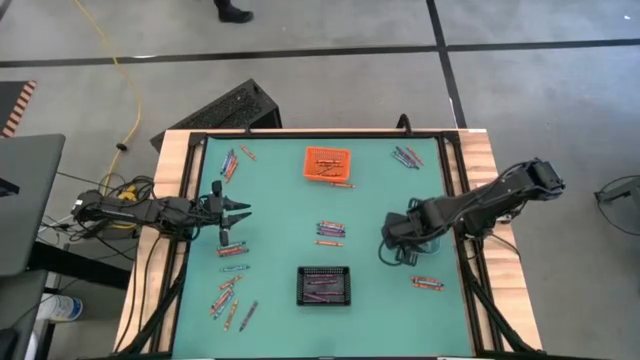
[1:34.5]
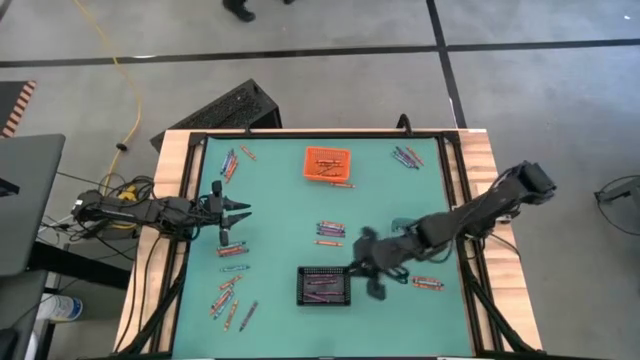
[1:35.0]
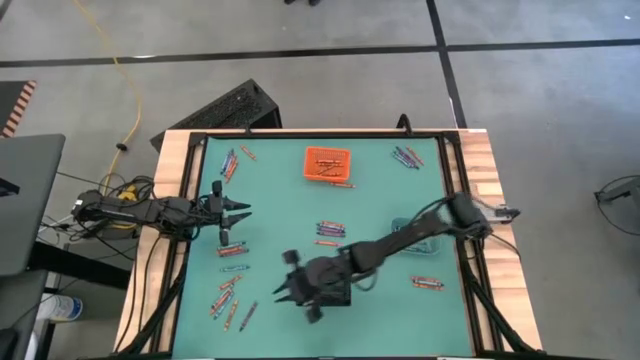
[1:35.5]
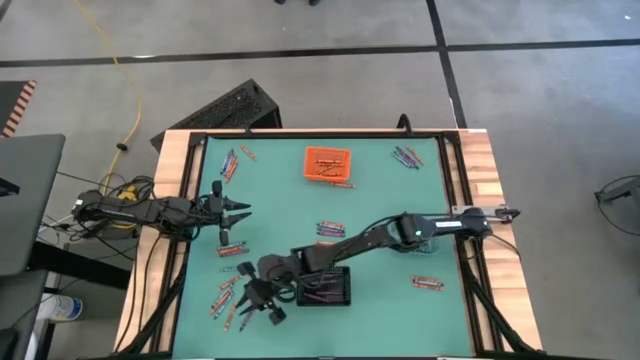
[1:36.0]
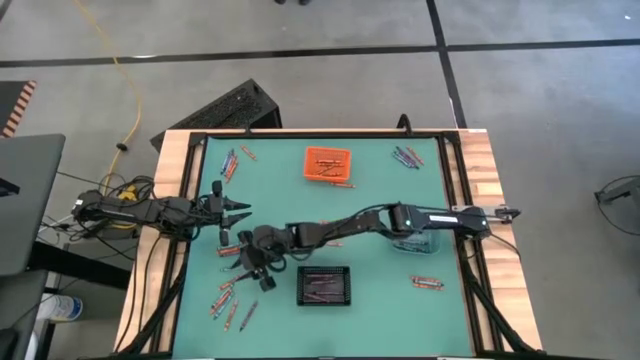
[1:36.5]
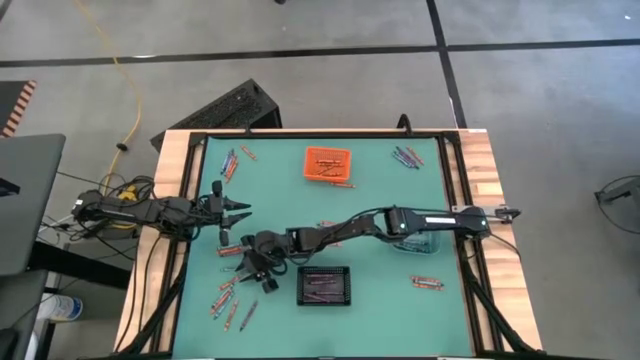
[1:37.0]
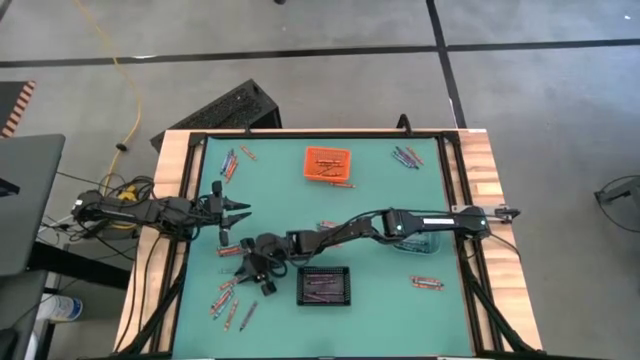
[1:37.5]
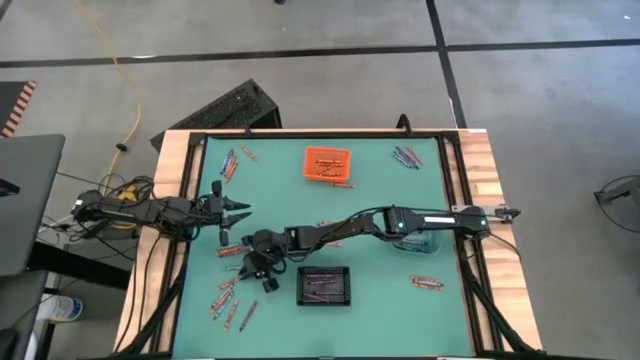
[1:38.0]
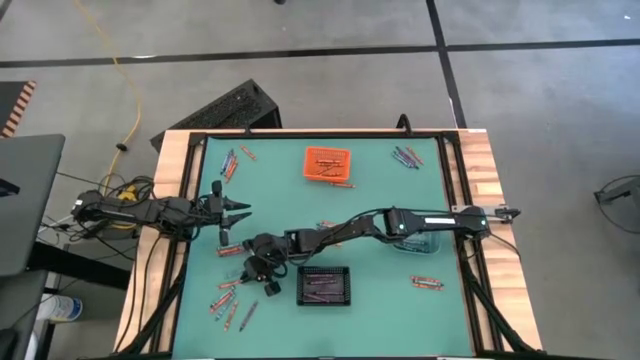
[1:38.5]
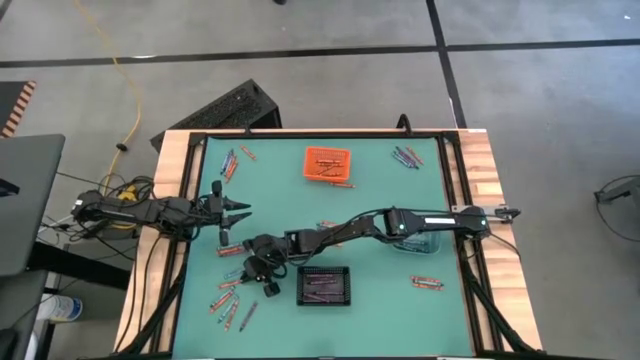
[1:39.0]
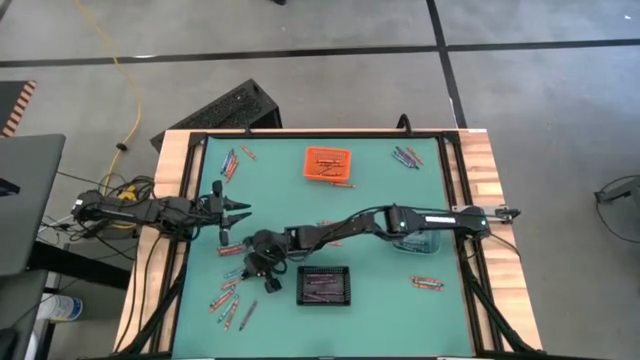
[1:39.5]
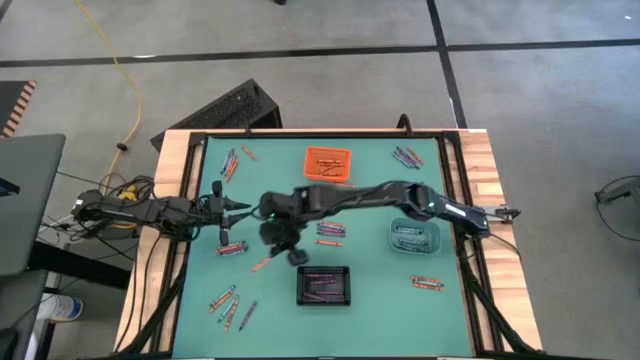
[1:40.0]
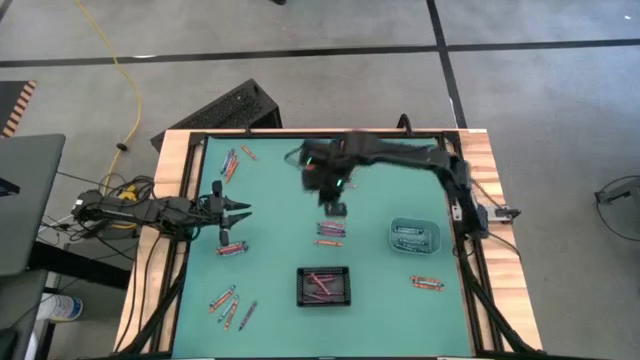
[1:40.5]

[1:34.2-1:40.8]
Task: Sort crayons
Put the orange crayon into the orange bin

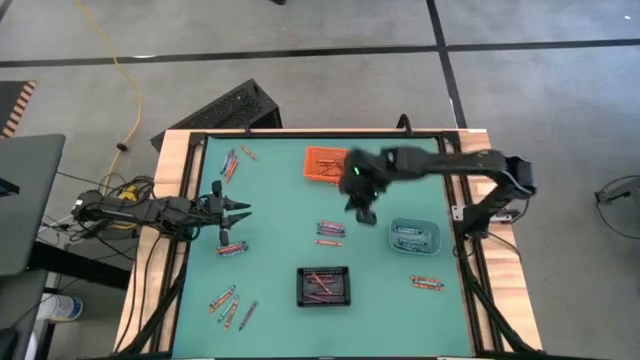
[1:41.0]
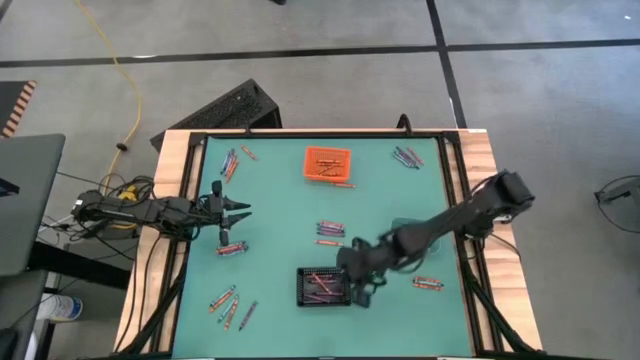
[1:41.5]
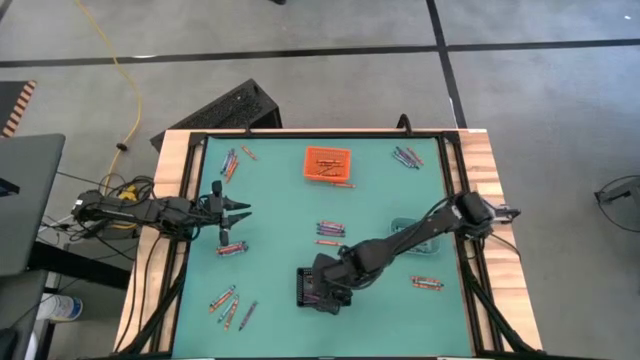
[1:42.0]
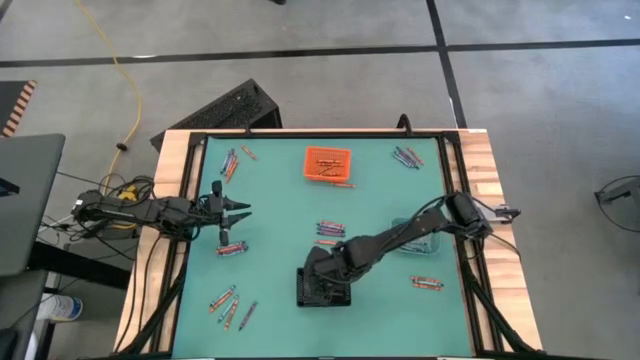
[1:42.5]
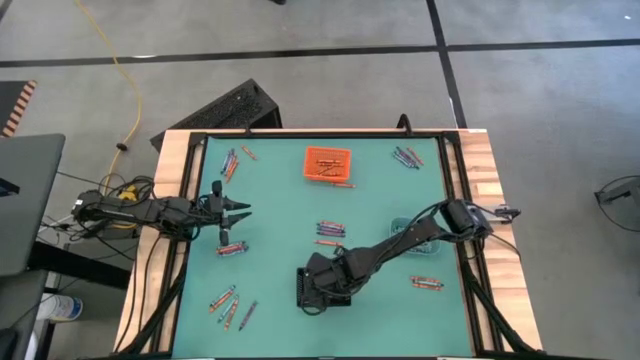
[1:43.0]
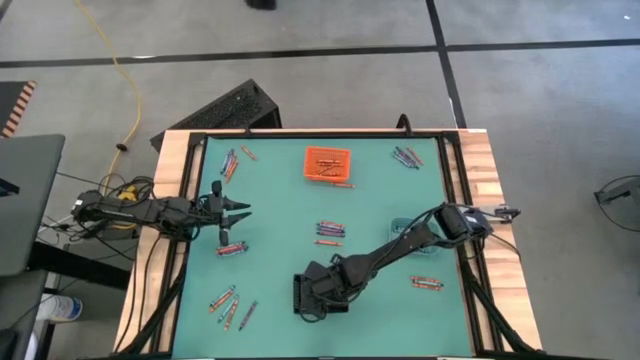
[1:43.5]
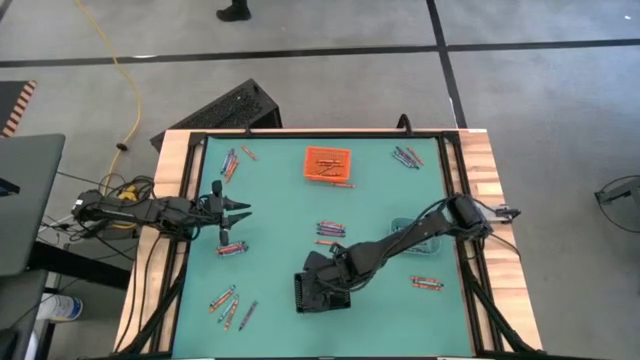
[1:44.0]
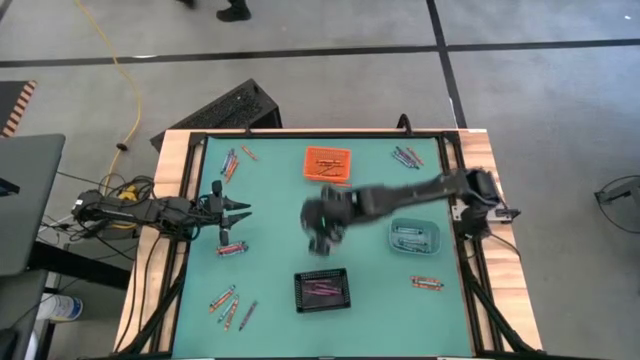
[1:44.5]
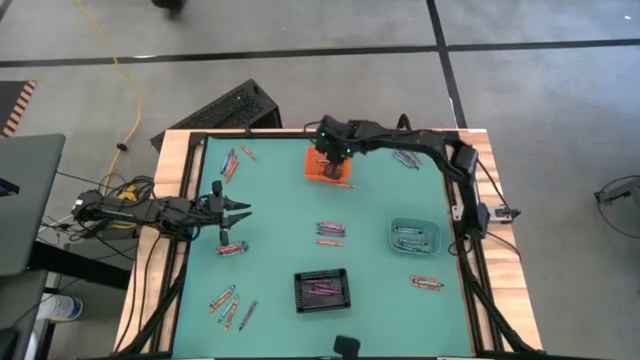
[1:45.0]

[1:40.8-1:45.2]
Put the orange crayon from the black bin into the orange bin

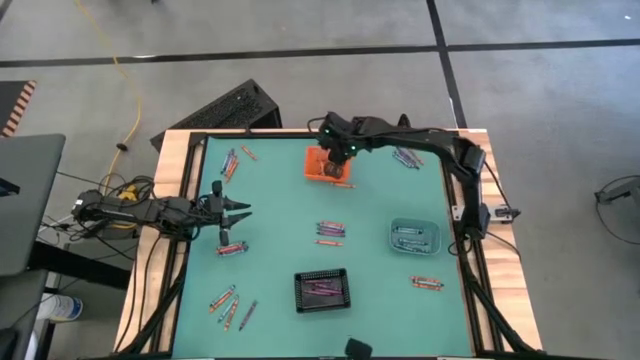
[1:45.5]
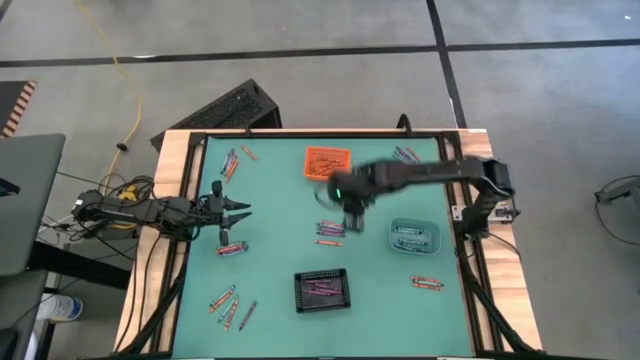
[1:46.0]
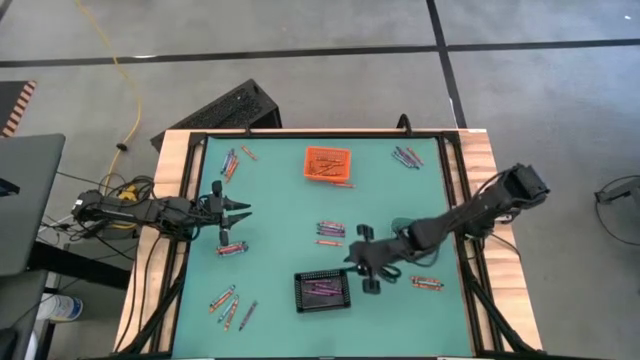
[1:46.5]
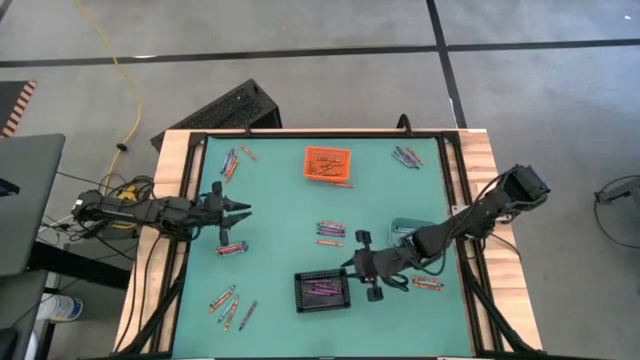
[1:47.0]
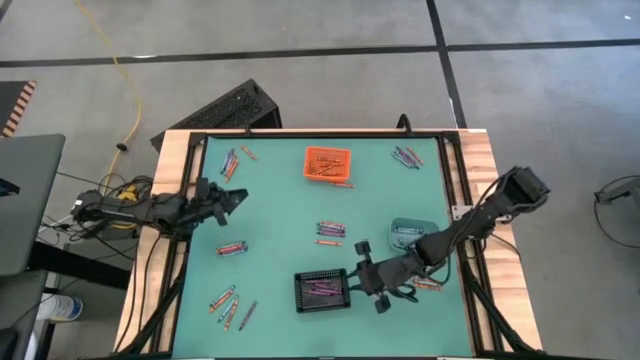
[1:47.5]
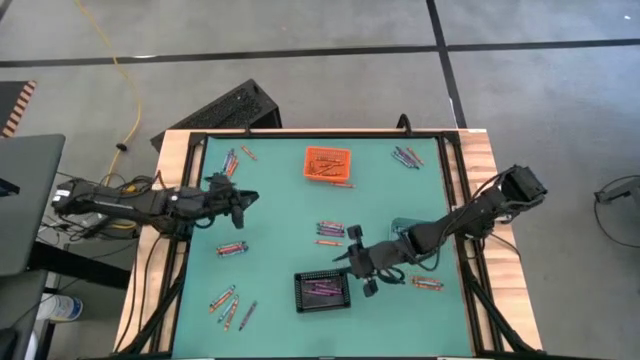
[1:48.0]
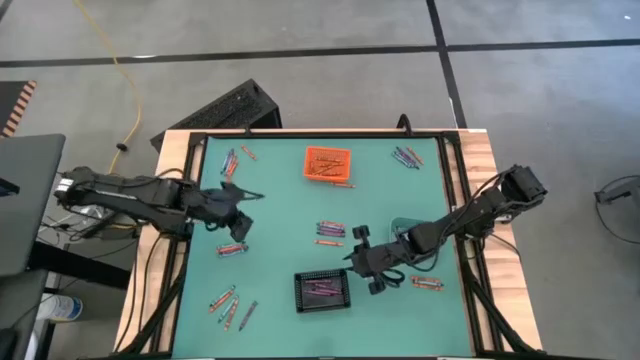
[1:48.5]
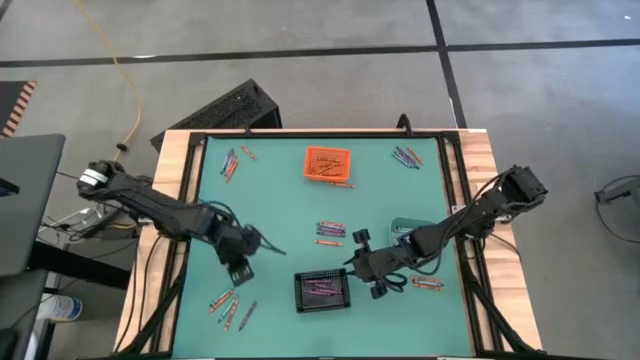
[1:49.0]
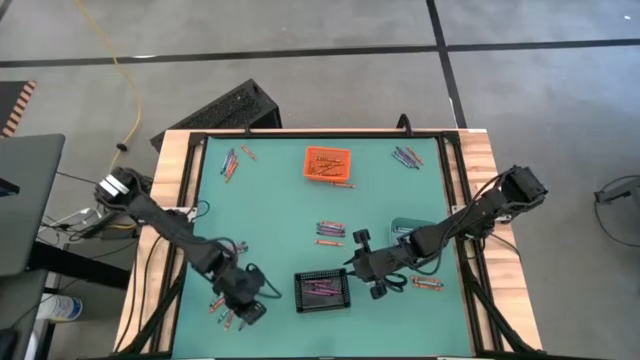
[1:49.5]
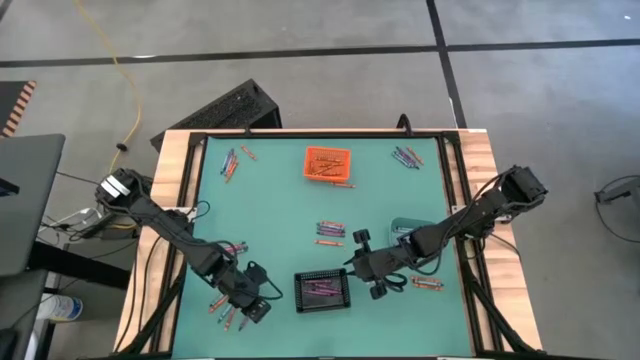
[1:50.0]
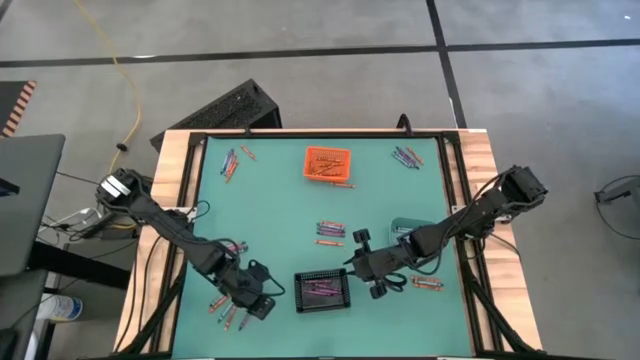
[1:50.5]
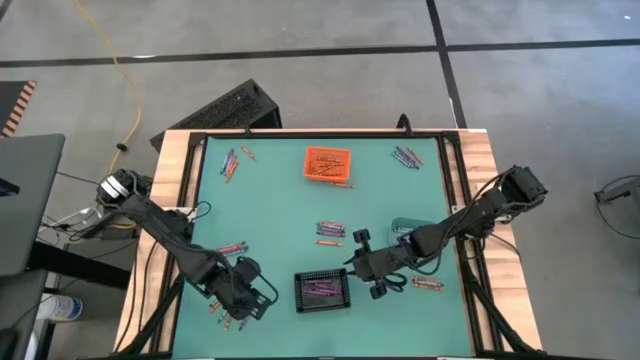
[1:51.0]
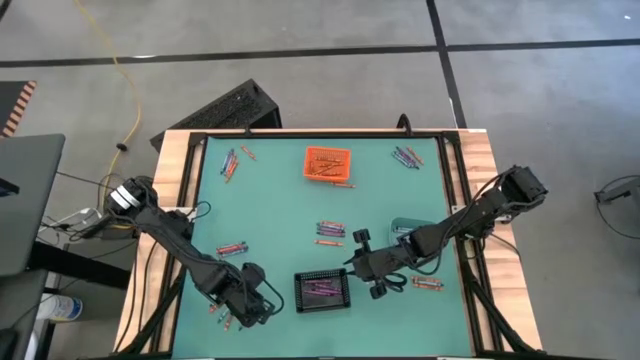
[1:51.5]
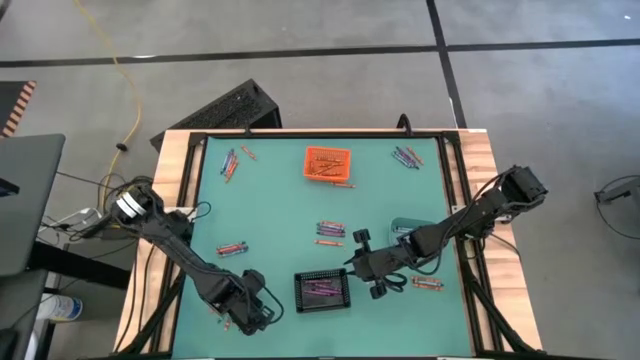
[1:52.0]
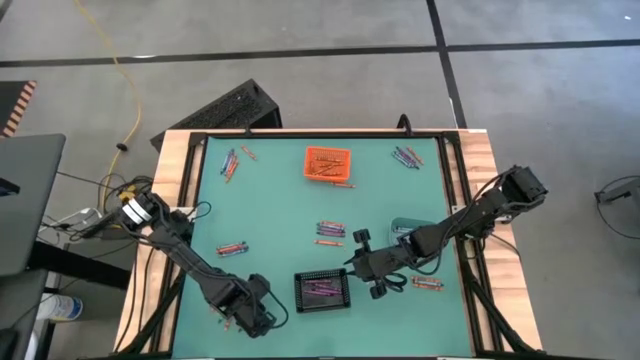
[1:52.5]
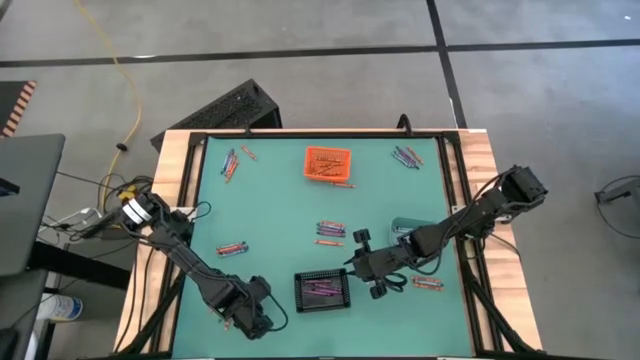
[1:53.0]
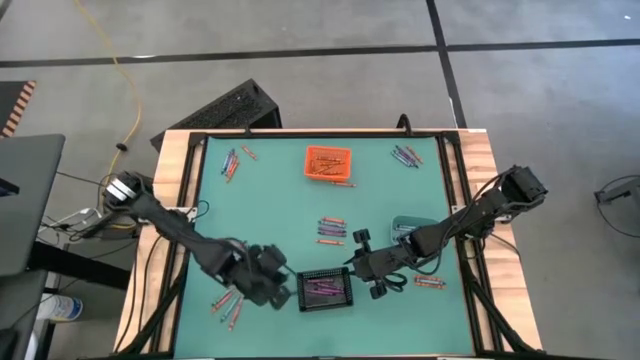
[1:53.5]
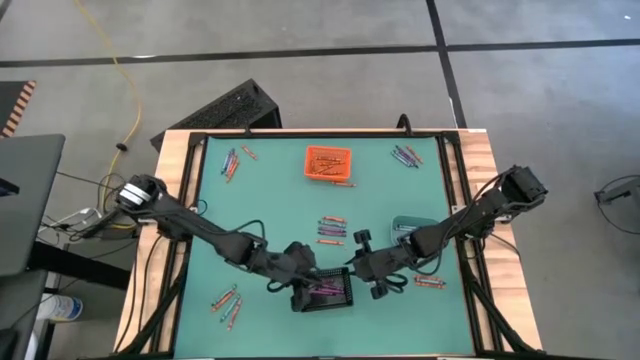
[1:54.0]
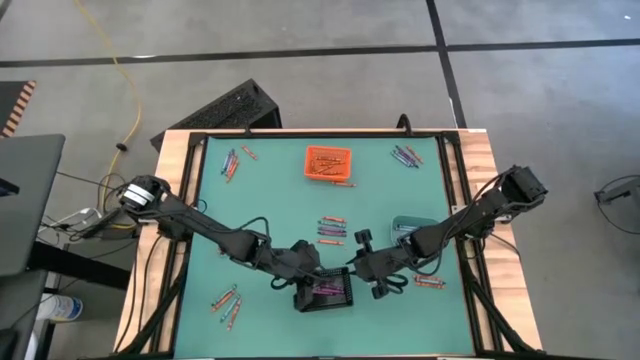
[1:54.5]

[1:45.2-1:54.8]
Put the purple crayon into the black bin

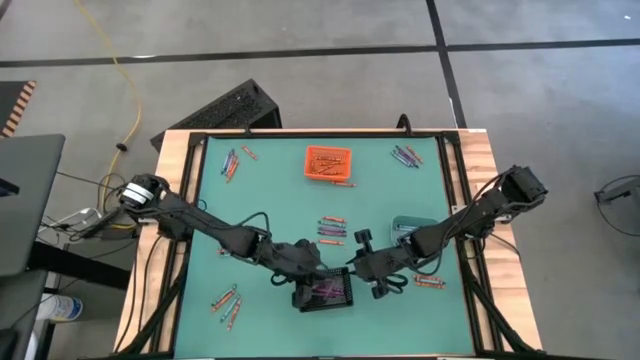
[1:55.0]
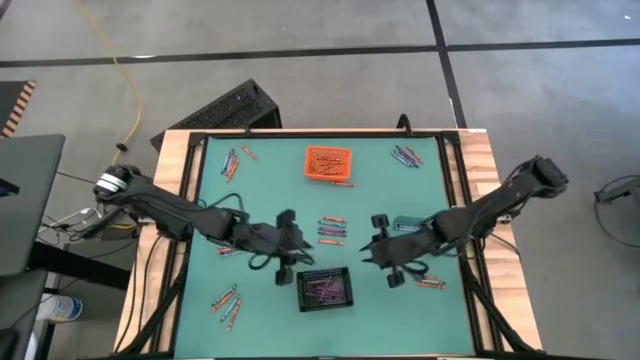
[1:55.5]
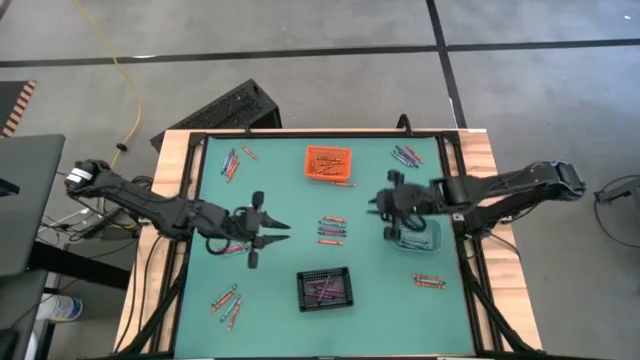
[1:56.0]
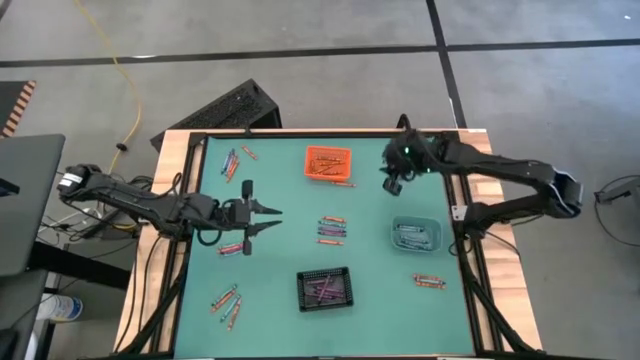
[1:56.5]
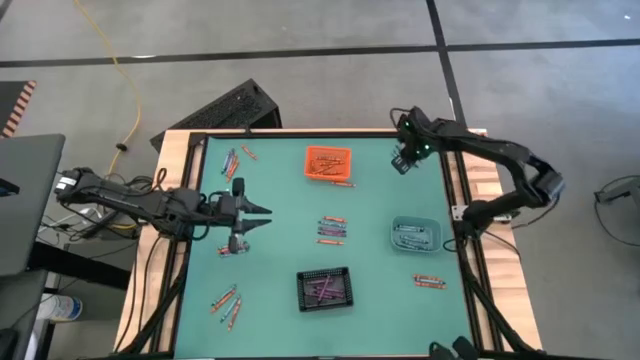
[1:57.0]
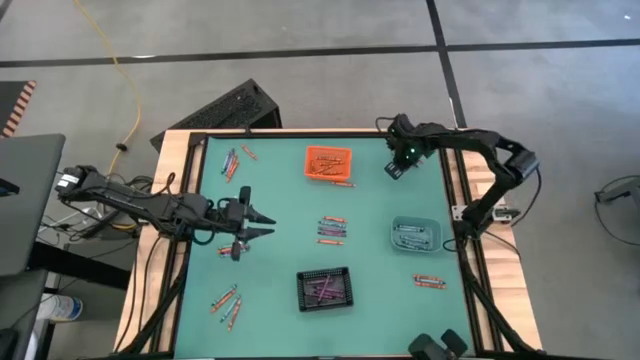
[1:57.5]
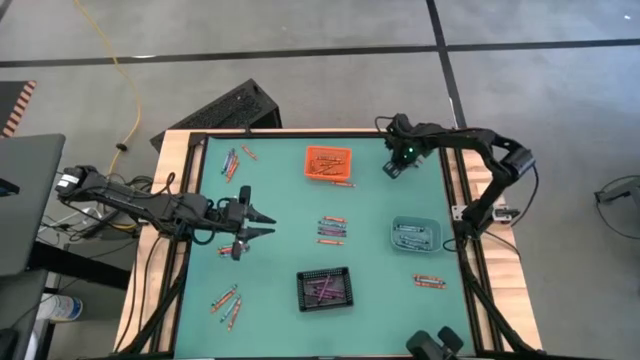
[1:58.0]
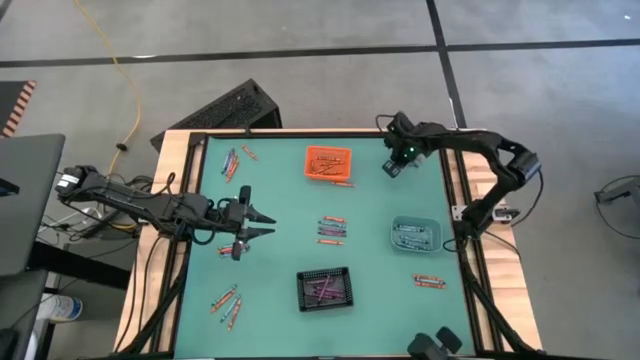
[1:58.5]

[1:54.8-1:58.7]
Put the blue crayon into the blue bin
